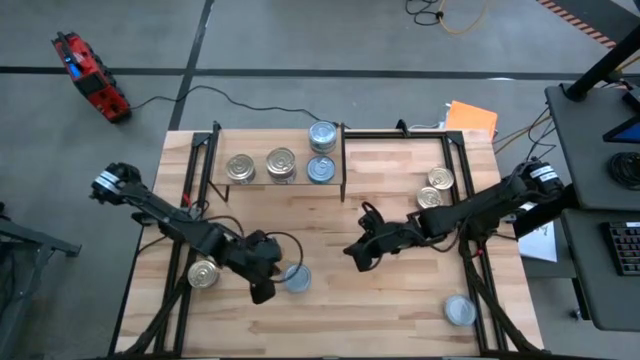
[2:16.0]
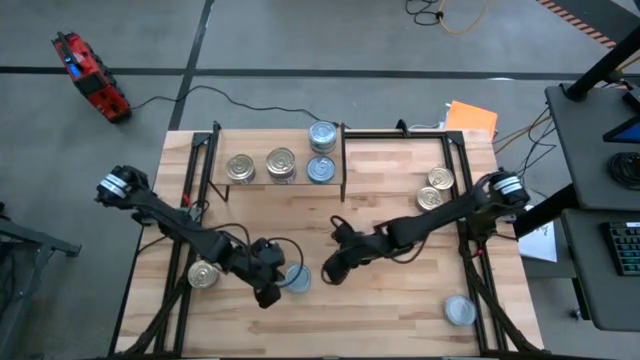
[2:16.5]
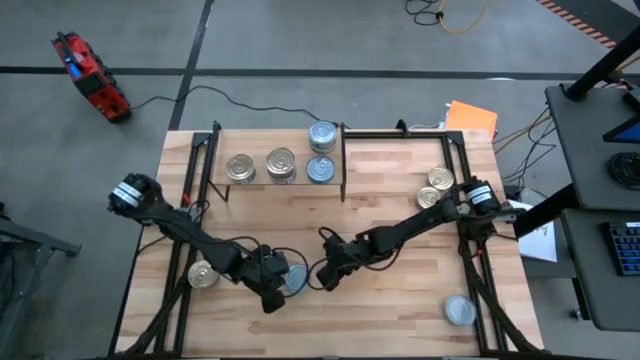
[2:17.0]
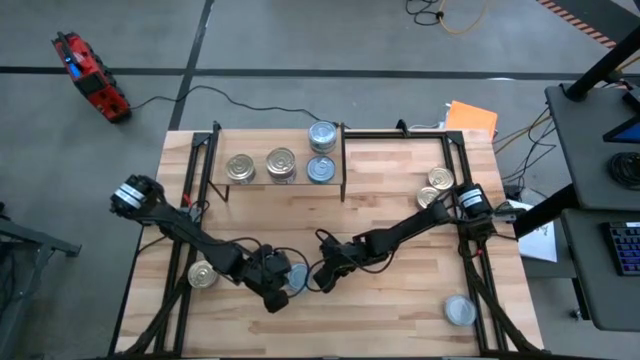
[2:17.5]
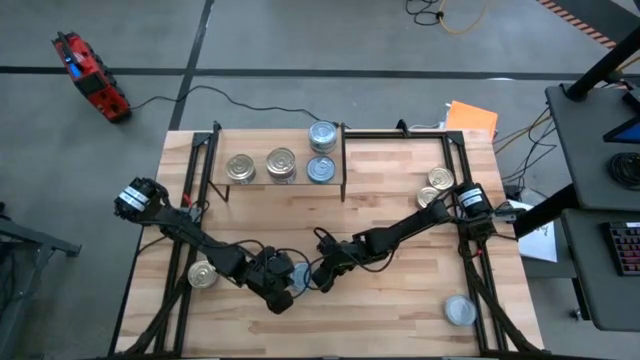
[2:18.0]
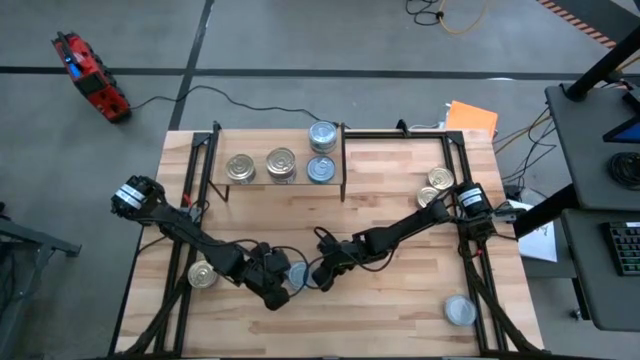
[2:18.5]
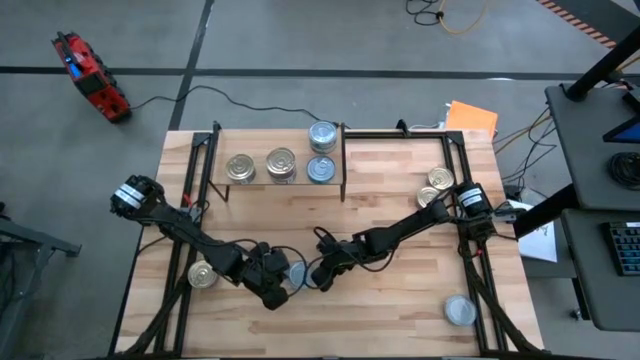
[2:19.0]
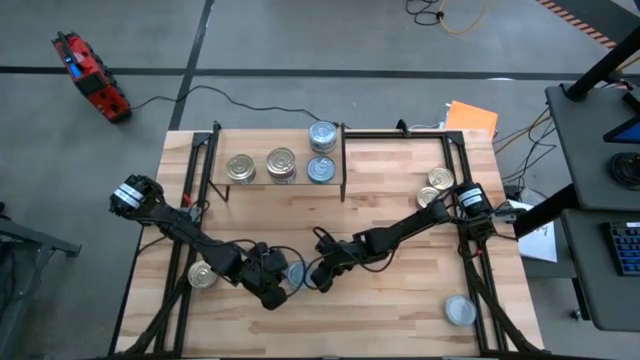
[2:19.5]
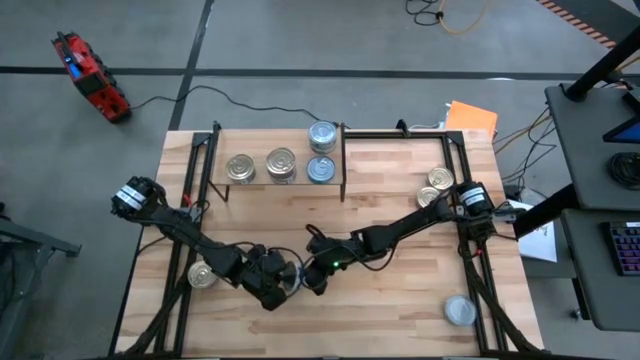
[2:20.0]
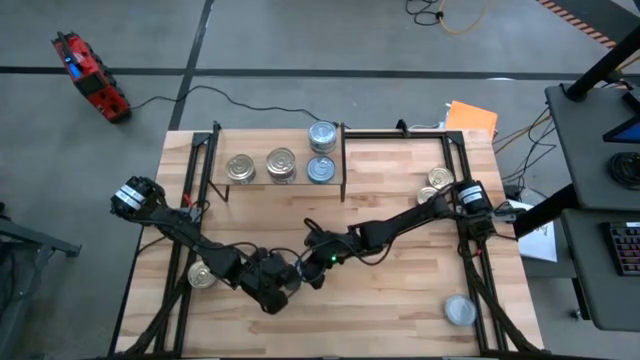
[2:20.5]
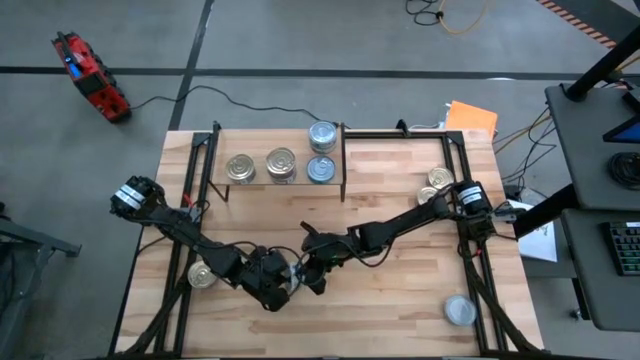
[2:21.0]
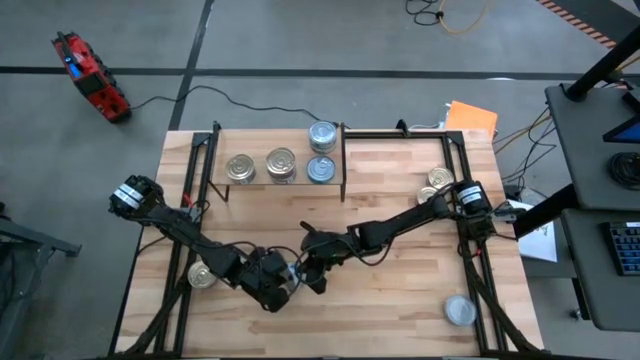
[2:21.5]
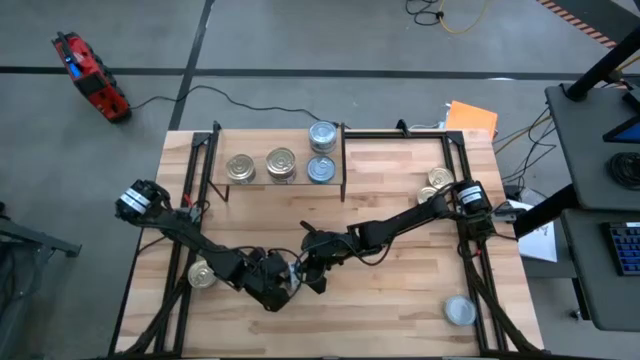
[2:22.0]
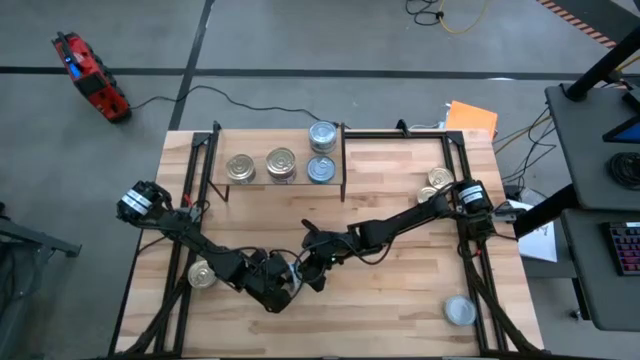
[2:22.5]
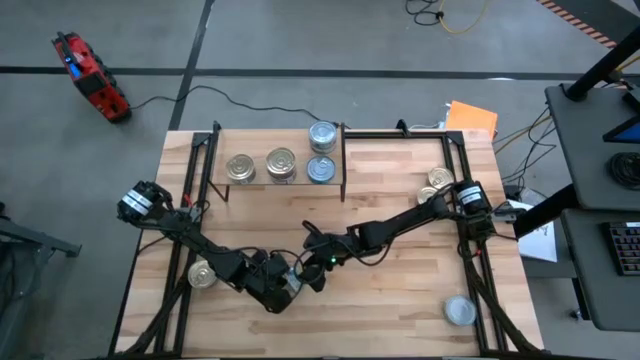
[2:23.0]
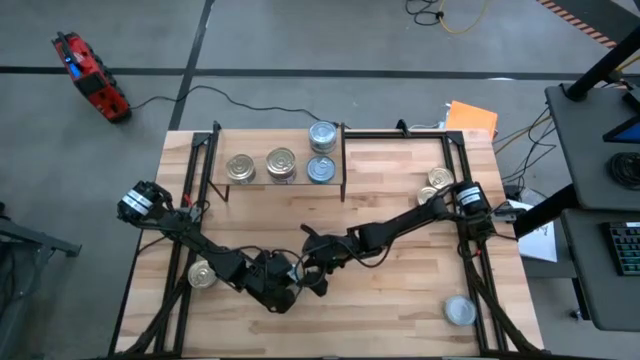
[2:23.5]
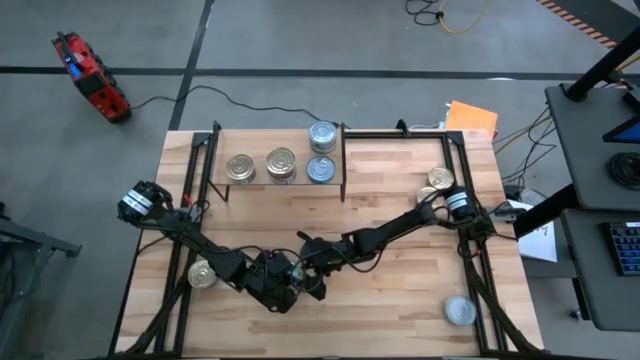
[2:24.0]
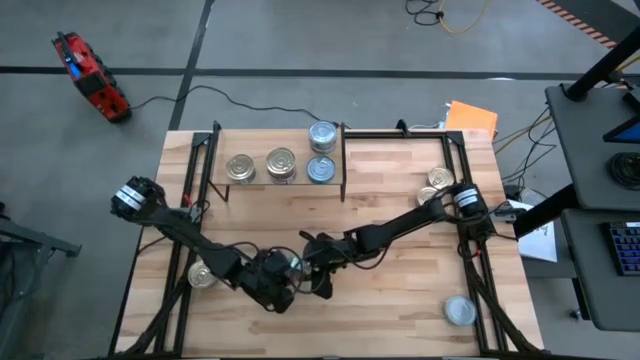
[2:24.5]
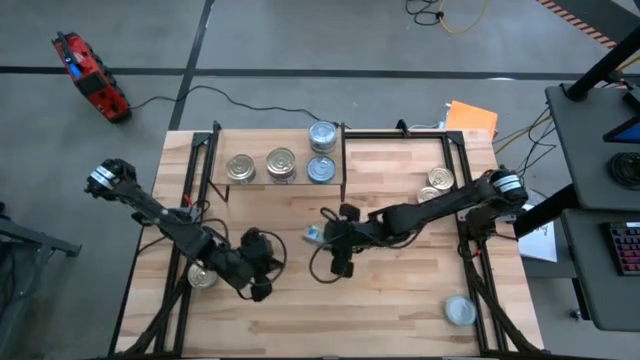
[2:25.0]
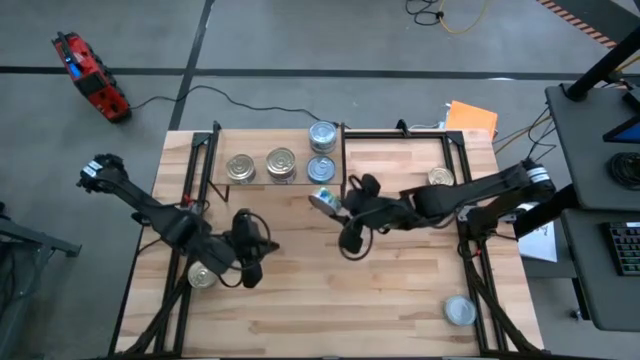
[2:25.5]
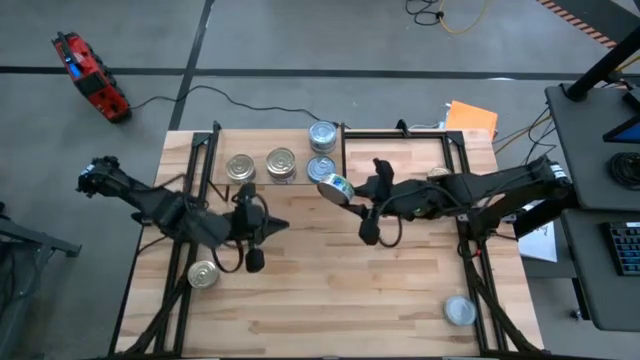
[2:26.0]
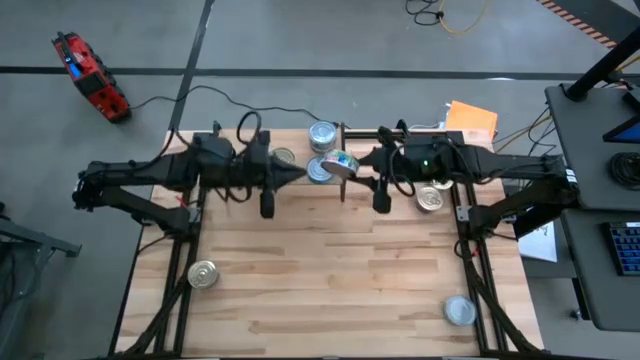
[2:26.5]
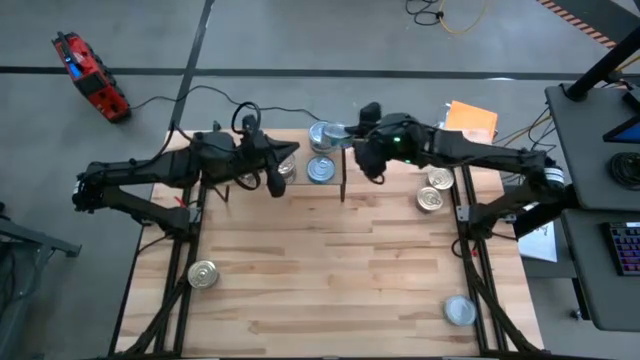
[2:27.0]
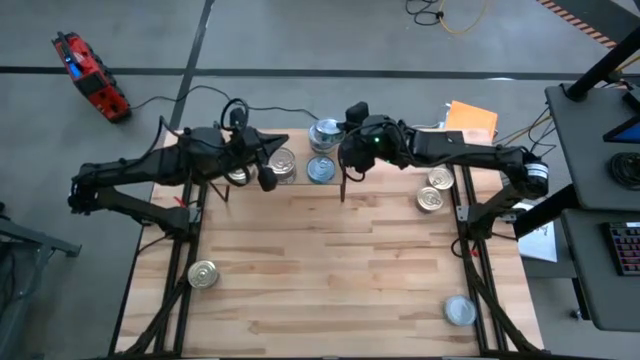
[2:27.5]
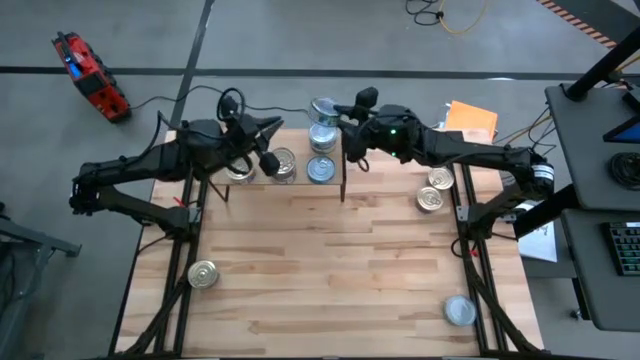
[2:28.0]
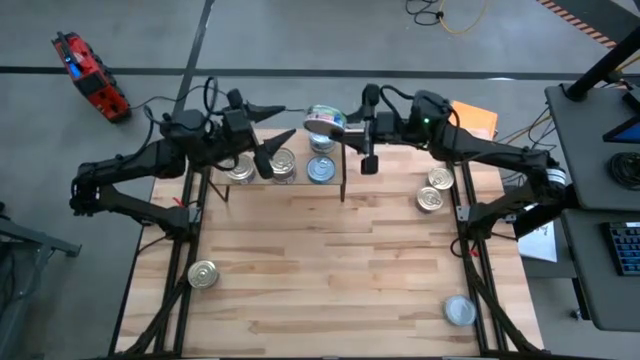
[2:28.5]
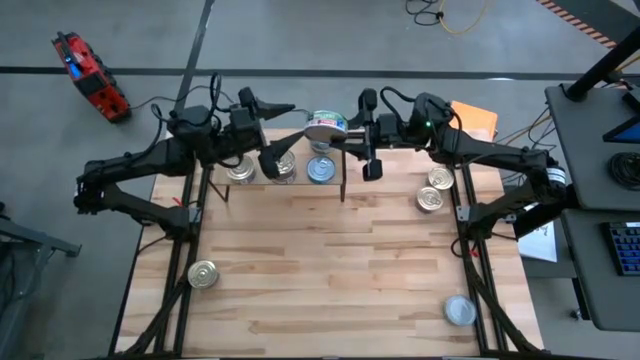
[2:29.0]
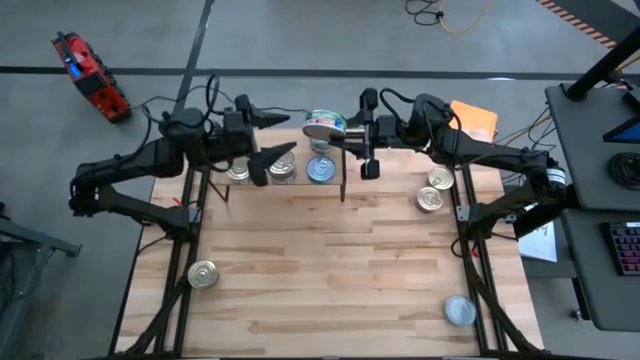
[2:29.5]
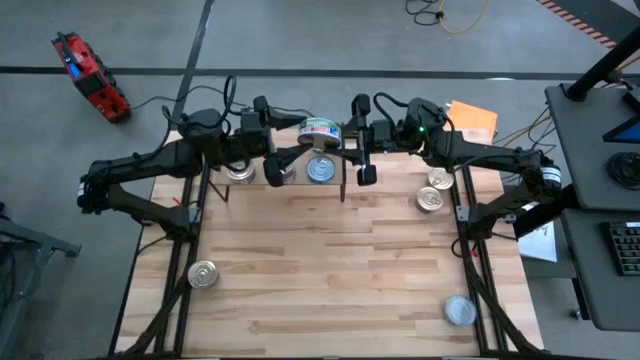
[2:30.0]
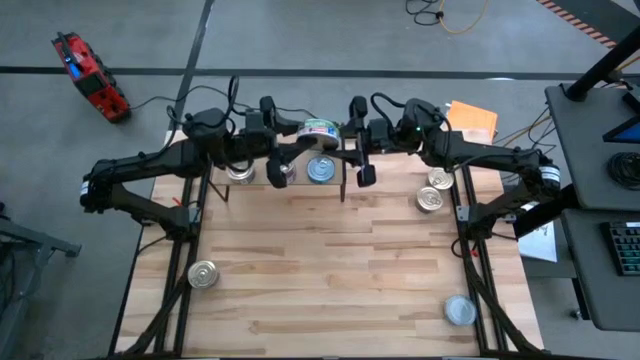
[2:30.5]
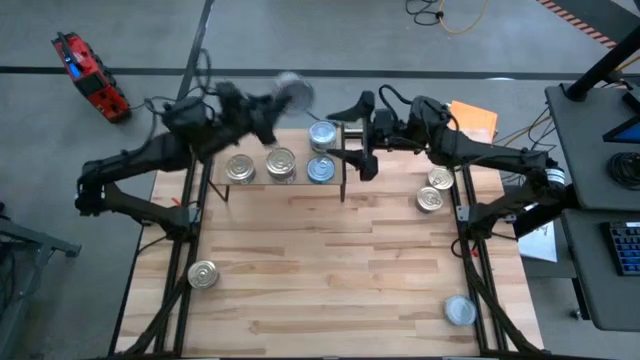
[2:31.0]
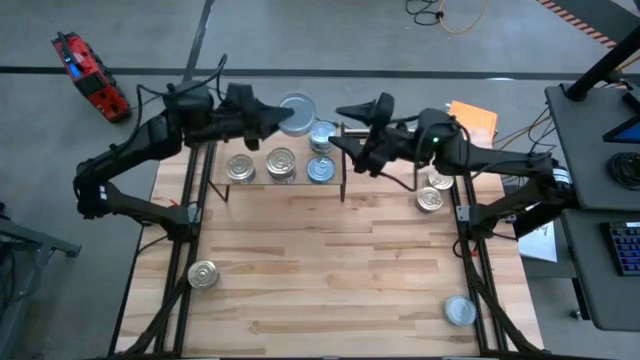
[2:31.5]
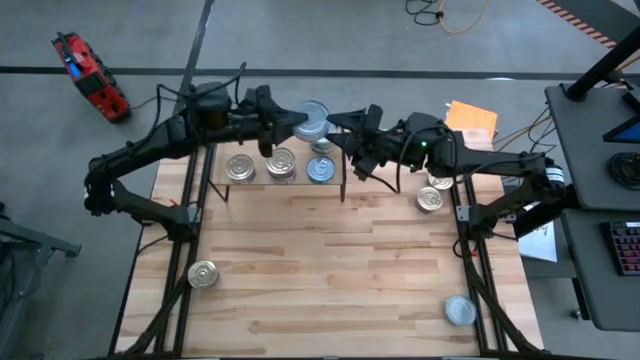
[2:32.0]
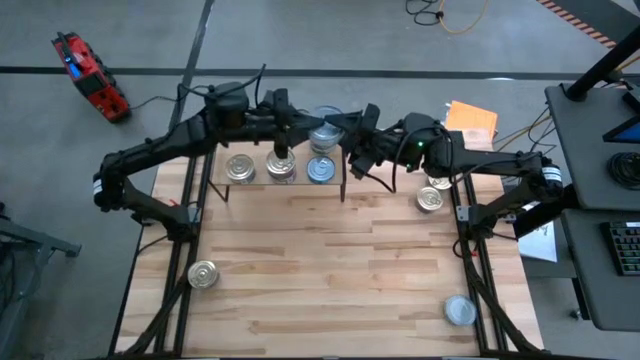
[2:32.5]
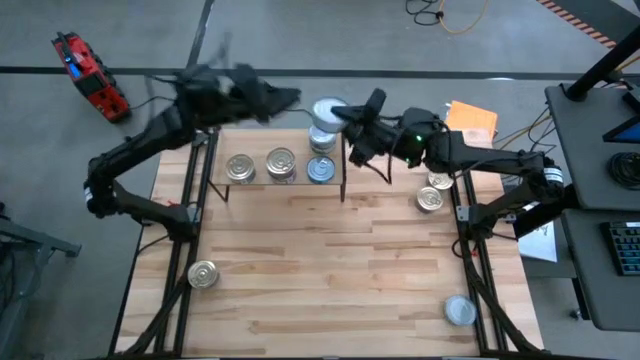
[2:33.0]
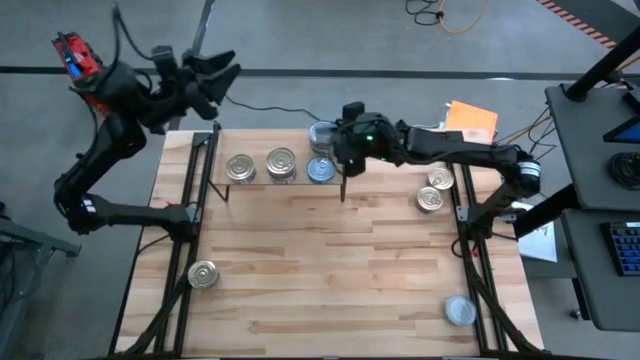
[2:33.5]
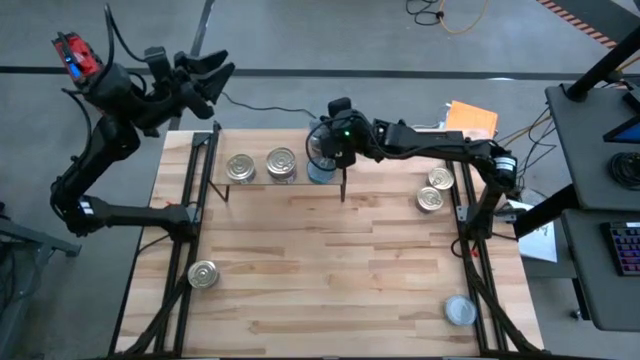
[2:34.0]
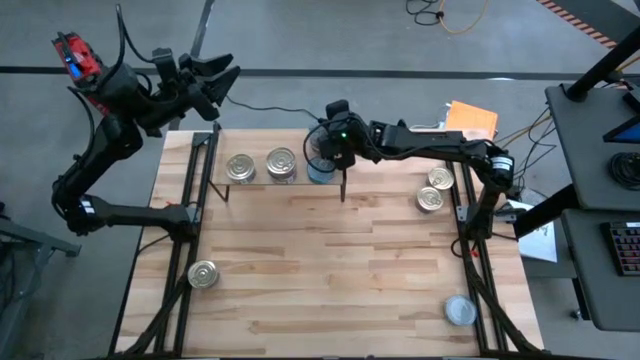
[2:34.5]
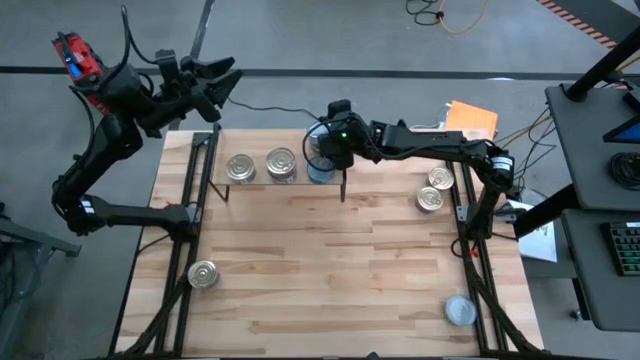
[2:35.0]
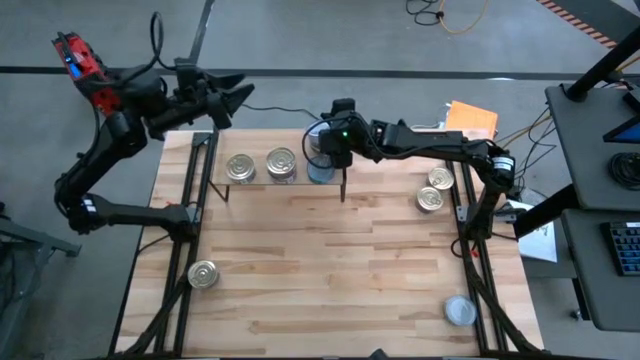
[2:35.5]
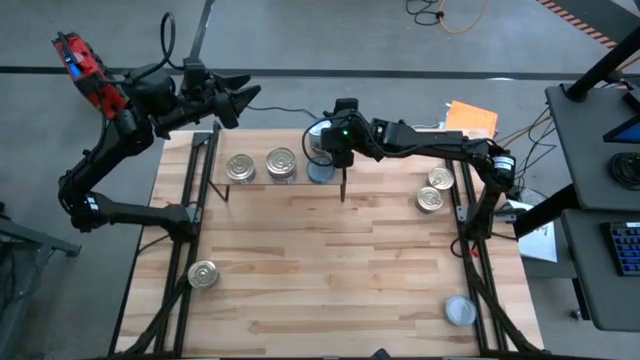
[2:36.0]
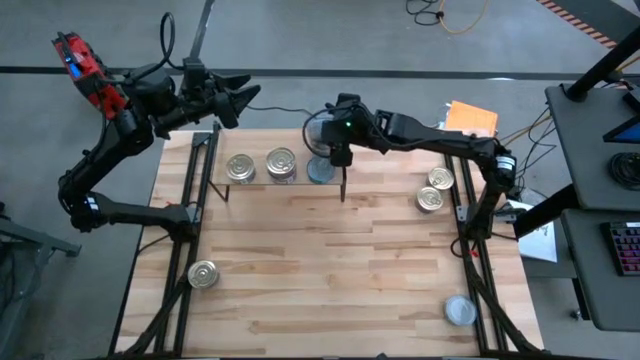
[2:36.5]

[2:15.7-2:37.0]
Task: Stack canned seafood by type on shelf
Stack the green tuna can on top of the green tuna can on the shelf

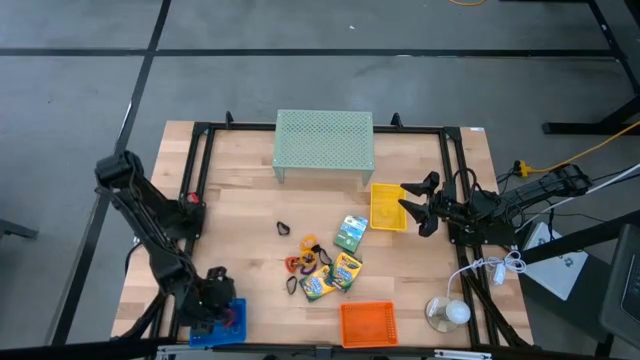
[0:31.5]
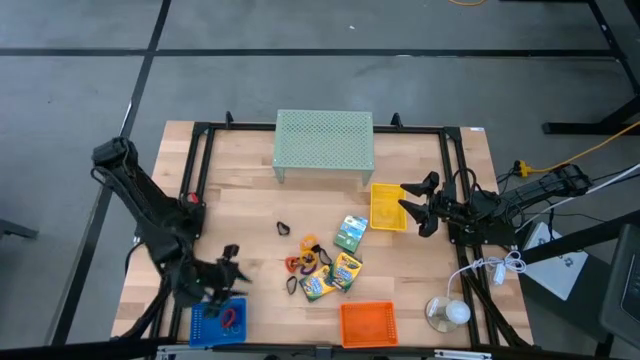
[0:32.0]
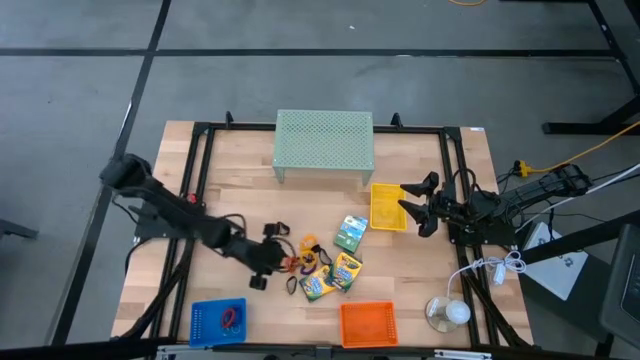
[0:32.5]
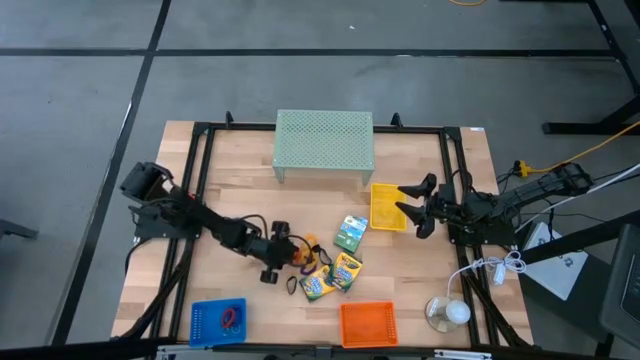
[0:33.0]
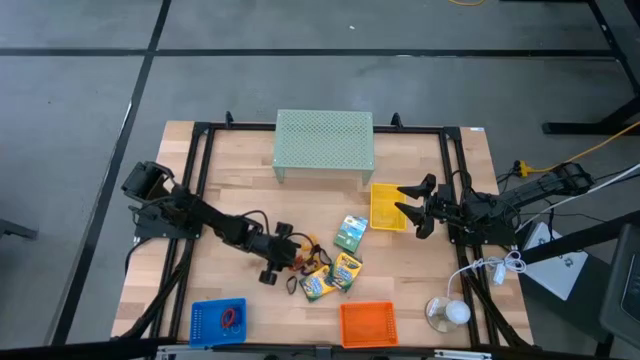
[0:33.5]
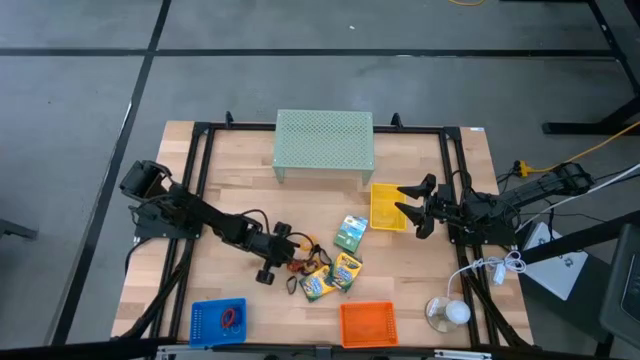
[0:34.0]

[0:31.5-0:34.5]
Task: Pick & Place Office Desk Supplies
Put the orange spring keychain into the blue bin
